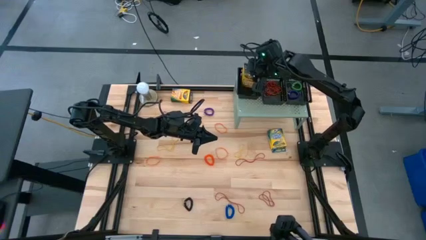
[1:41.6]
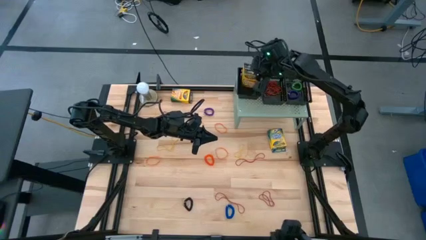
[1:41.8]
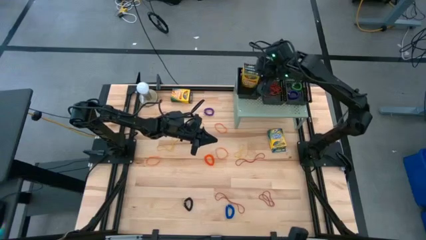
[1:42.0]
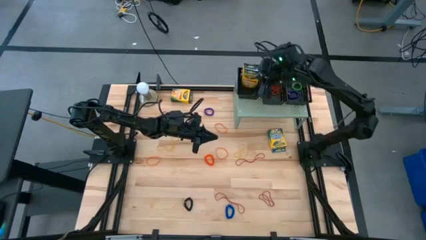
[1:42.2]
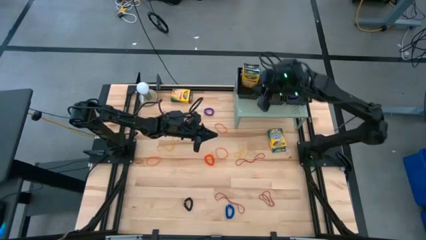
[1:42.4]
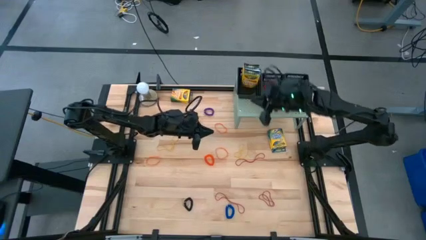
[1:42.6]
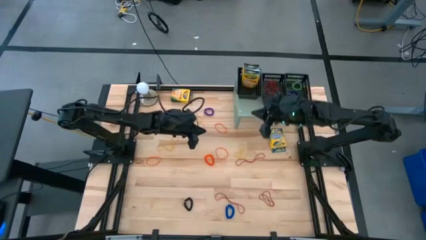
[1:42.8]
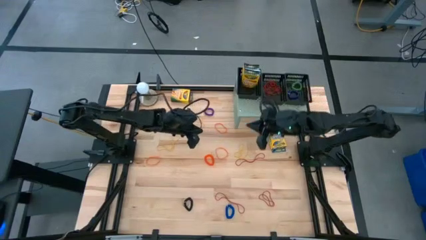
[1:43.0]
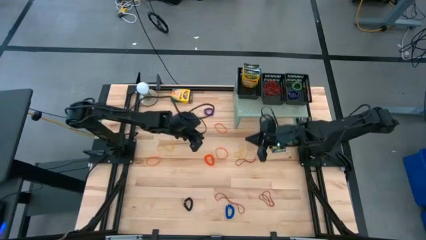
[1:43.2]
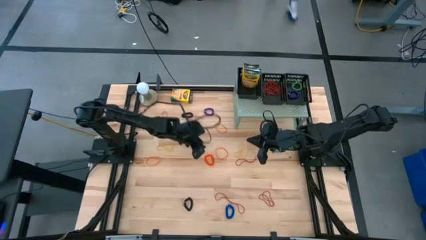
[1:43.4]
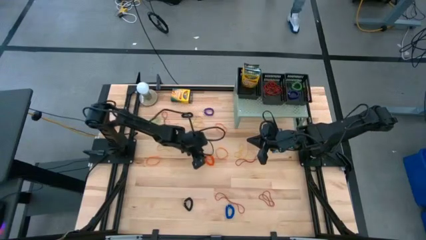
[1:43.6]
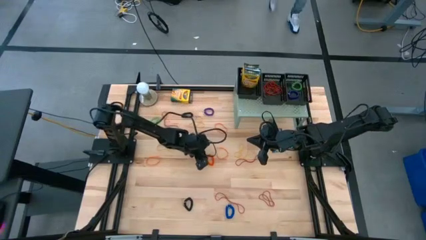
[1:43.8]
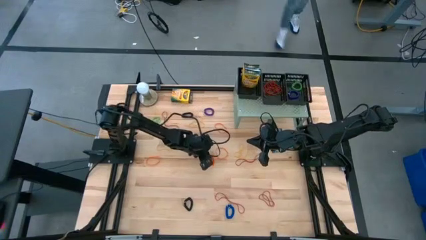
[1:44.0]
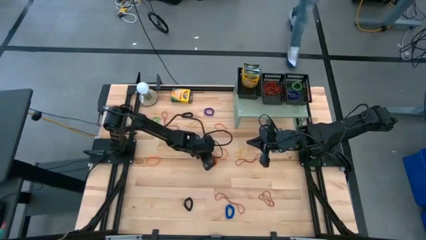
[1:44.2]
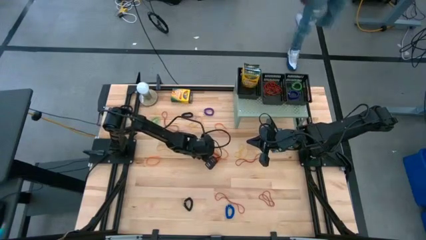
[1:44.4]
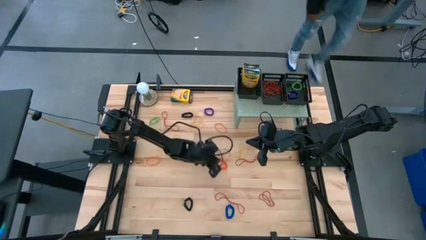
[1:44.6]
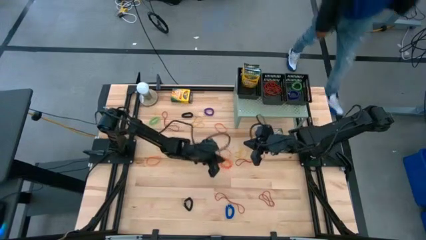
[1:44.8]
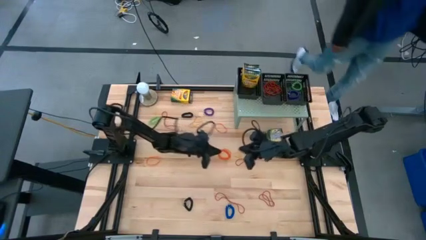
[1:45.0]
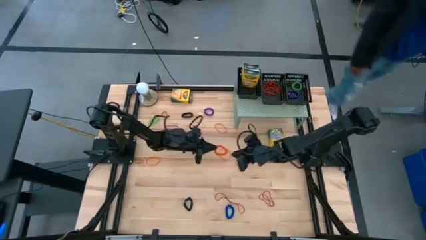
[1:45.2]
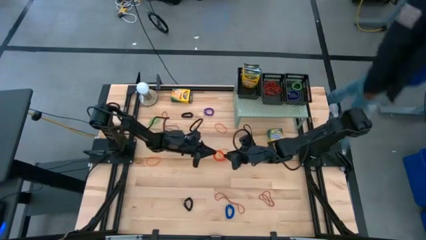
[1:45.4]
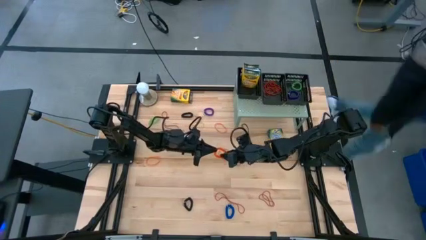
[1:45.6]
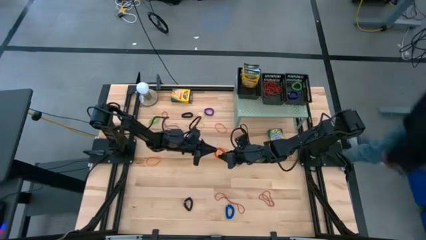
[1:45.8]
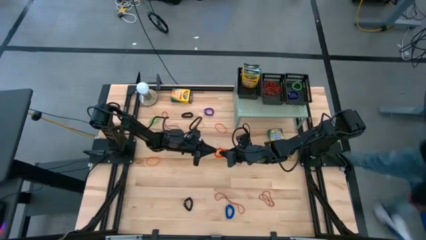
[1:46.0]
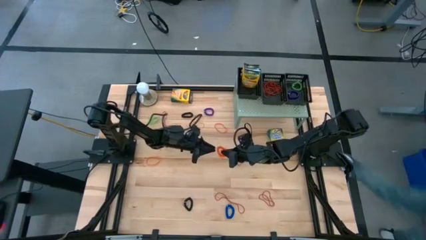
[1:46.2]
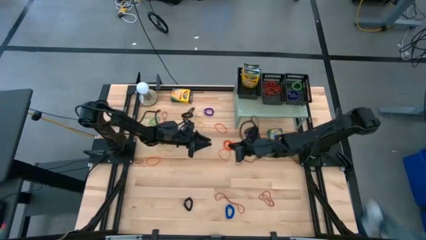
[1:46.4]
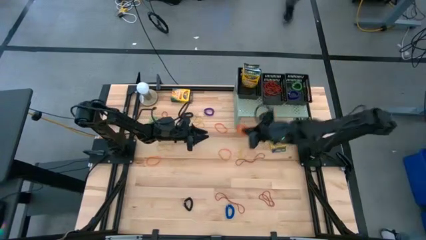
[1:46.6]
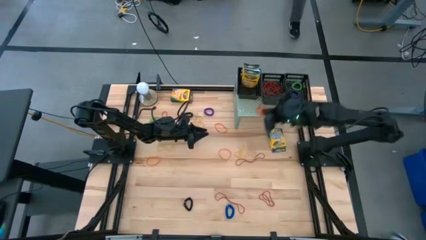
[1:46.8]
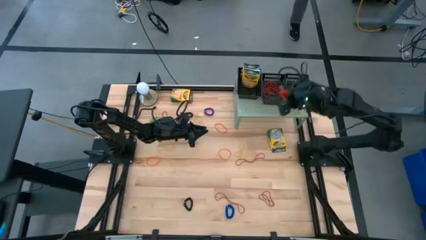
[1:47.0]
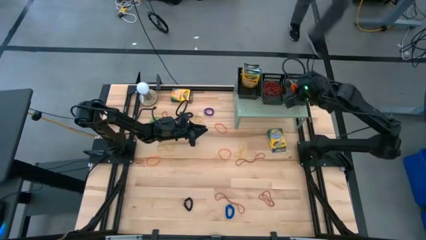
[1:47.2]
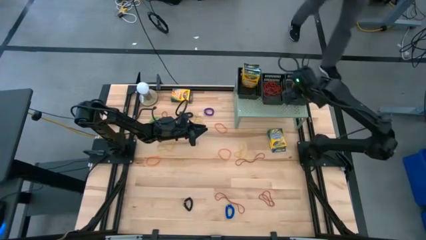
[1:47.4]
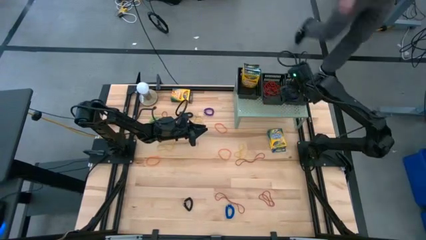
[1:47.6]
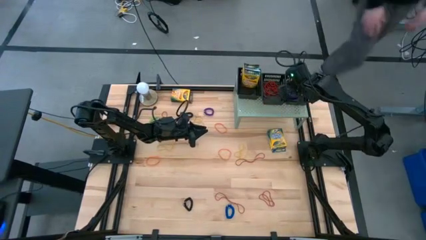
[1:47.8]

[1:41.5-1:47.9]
Task: Pick & Place Office Desk Supplies
Put the orange spring keychain into the right black basket on the shelf

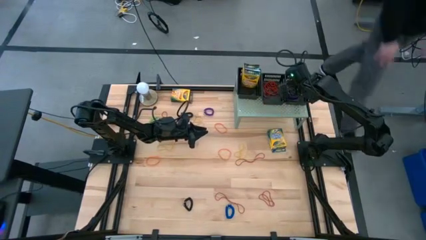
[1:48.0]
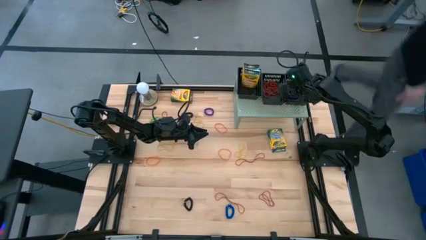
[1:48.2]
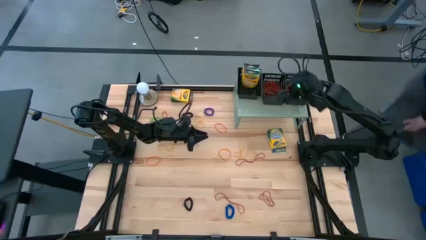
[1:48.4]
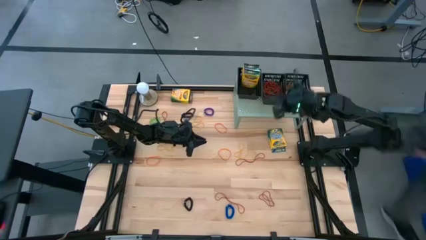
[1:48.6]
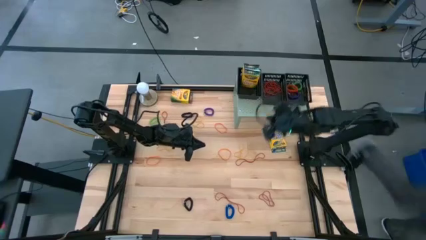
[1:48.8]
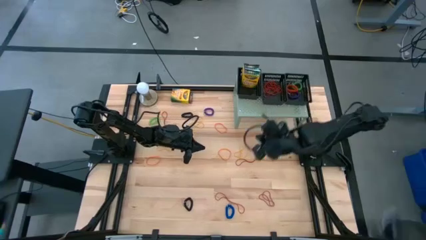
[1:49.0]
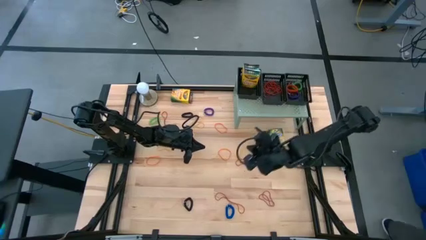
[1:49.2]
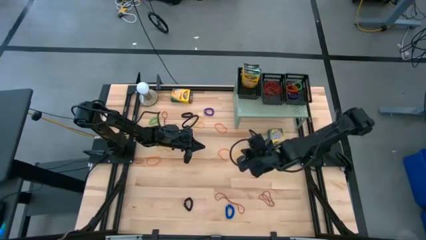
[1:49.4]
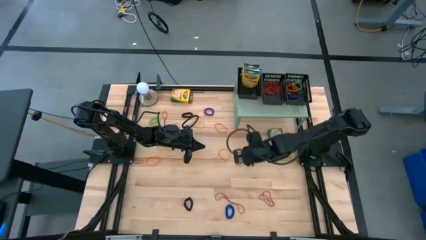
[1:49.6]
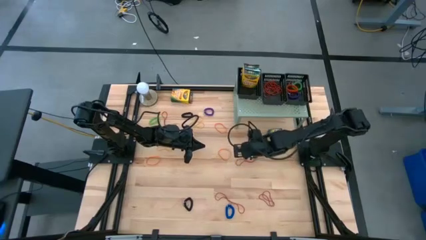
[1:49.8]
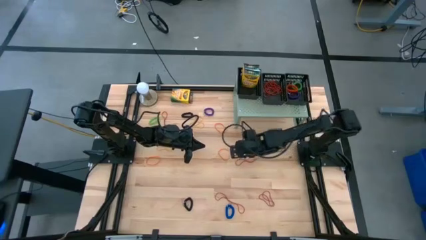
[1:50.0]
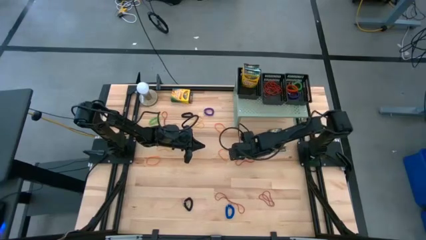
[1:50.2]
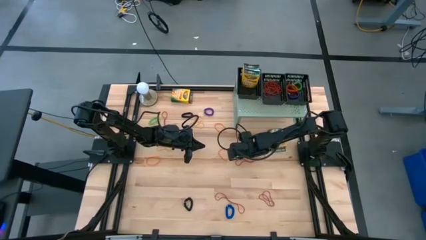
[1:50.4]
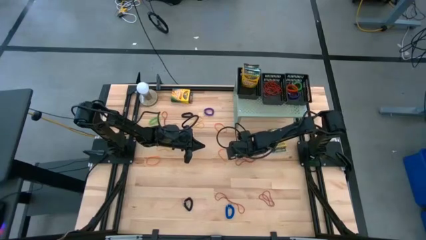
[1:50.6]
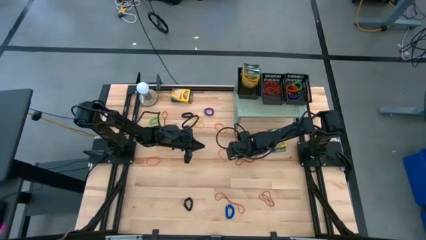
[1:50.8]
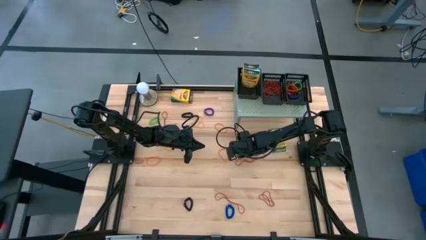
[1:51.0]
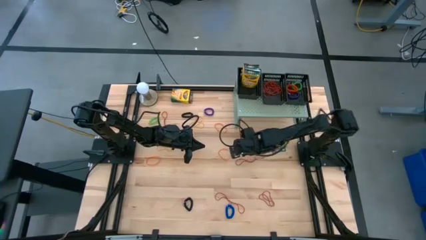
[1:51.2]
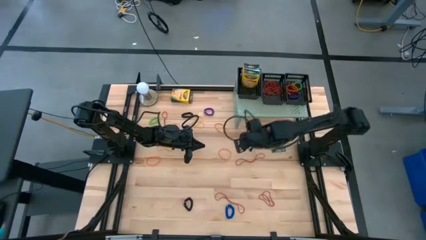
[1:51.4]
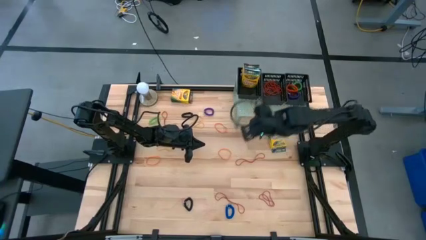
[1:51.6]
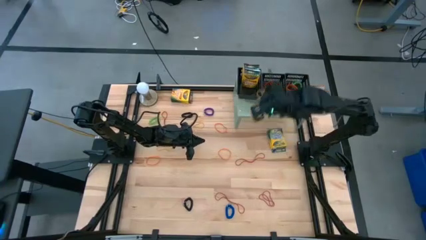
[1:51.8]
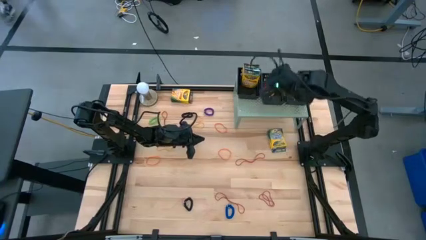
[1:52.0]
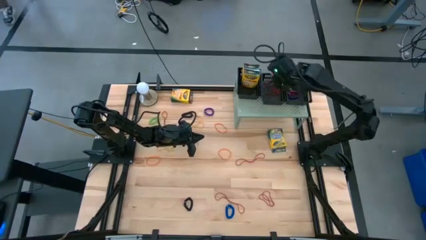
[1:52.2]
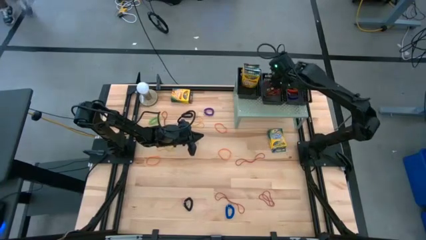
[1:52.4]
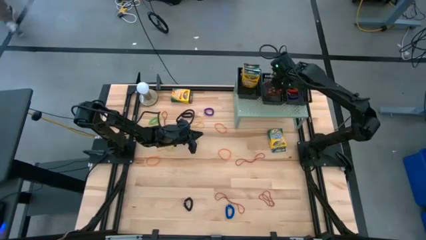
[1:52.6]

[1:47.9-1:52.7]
Put the bottom right yellow rubber band into the middle black basket on the shelf

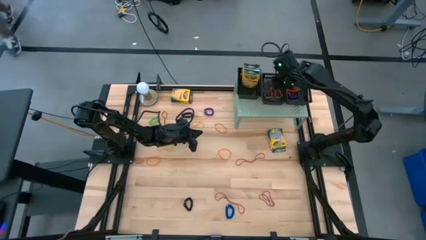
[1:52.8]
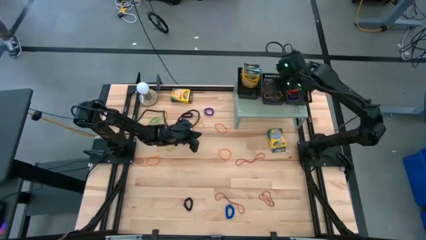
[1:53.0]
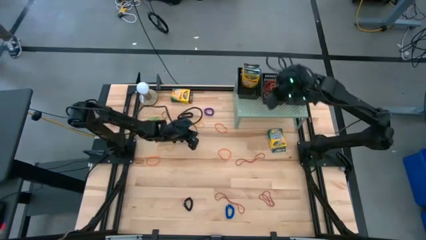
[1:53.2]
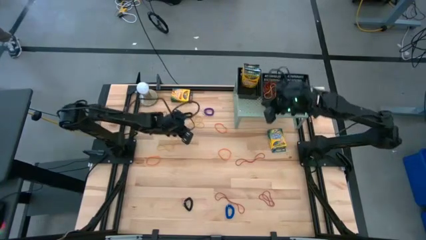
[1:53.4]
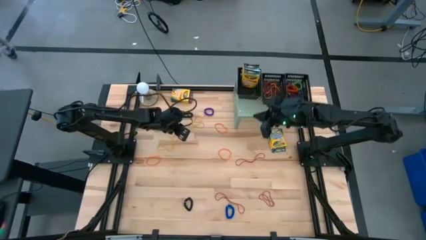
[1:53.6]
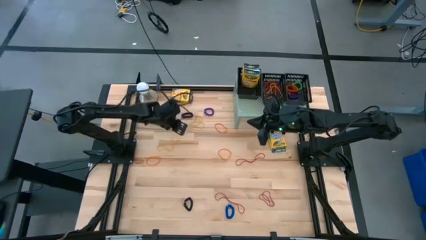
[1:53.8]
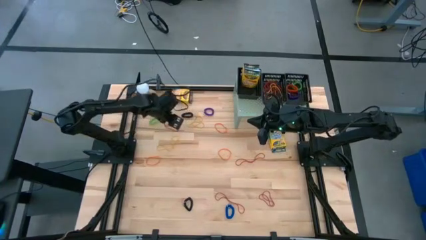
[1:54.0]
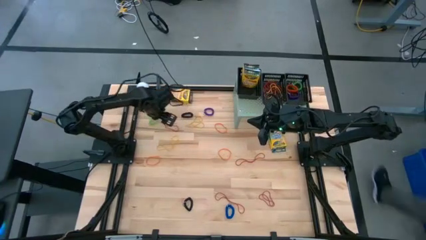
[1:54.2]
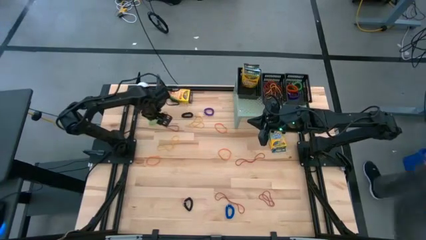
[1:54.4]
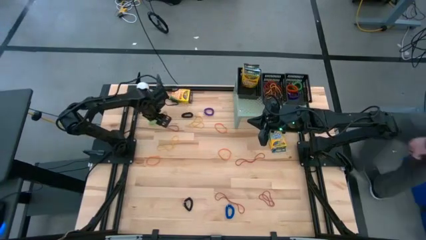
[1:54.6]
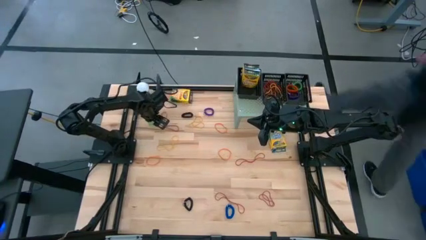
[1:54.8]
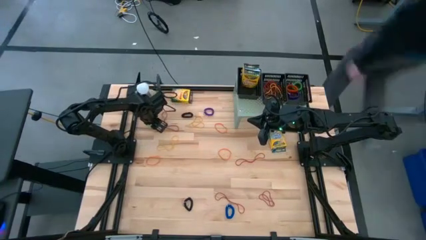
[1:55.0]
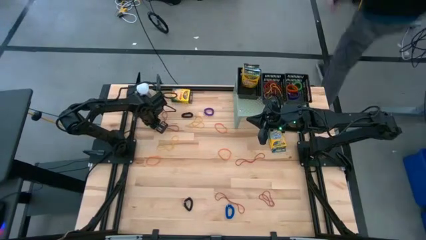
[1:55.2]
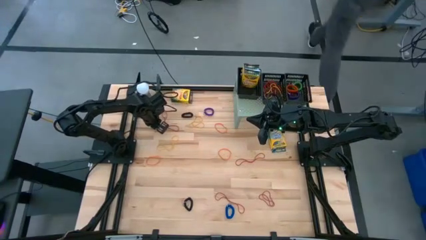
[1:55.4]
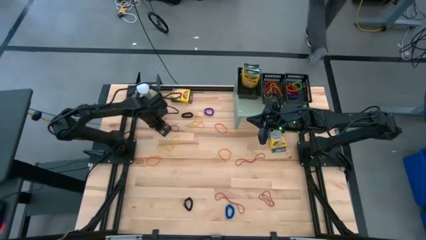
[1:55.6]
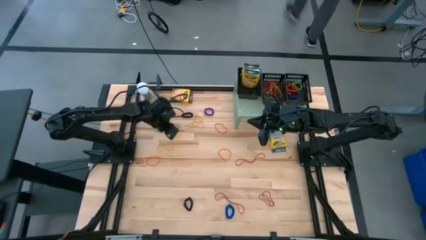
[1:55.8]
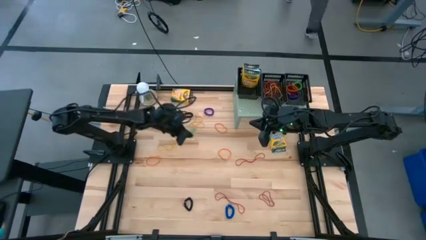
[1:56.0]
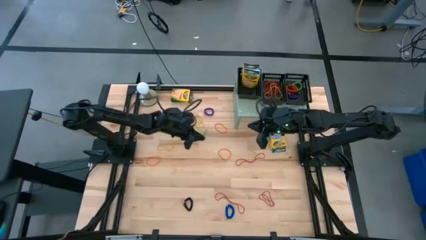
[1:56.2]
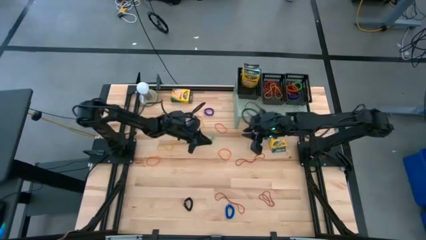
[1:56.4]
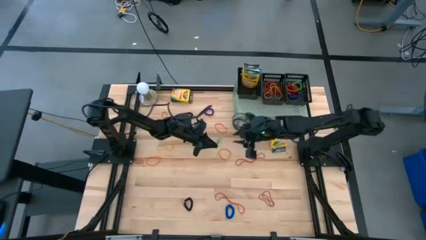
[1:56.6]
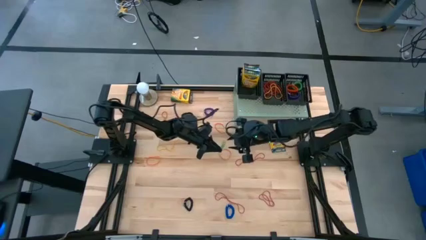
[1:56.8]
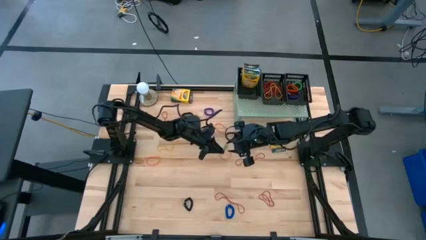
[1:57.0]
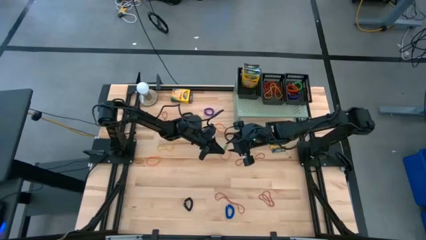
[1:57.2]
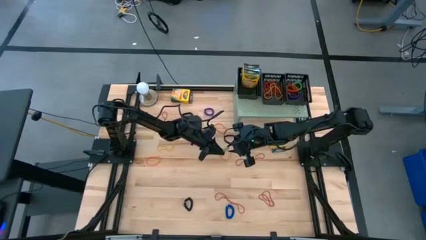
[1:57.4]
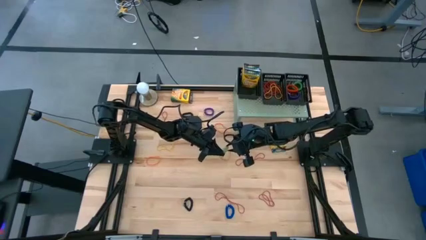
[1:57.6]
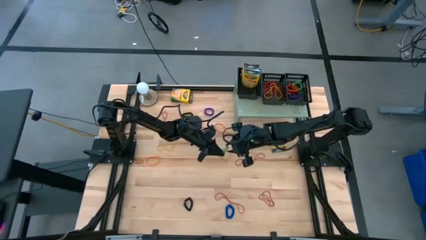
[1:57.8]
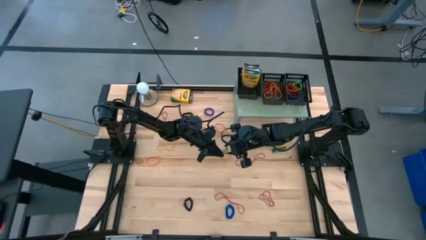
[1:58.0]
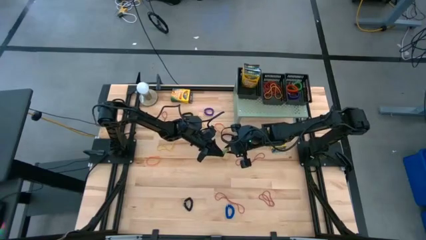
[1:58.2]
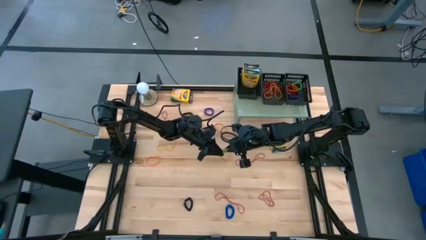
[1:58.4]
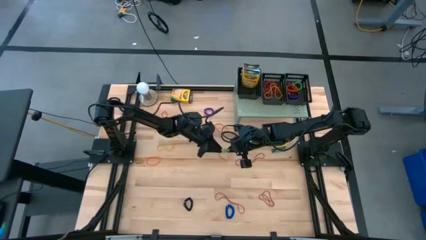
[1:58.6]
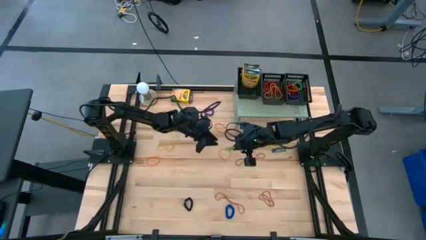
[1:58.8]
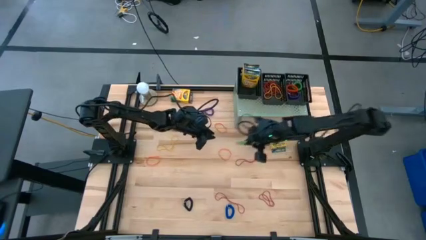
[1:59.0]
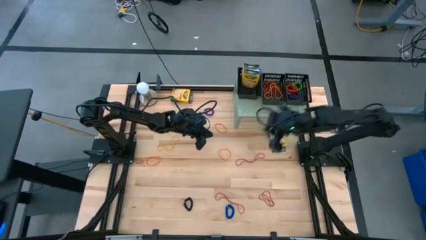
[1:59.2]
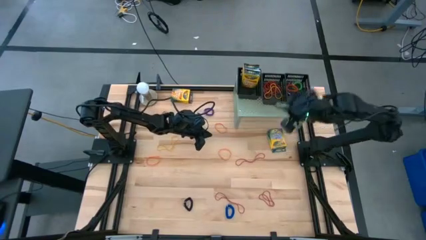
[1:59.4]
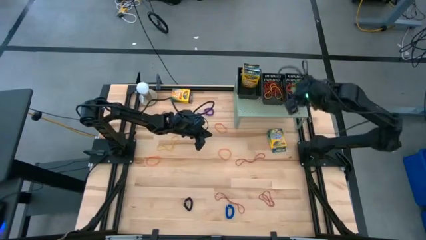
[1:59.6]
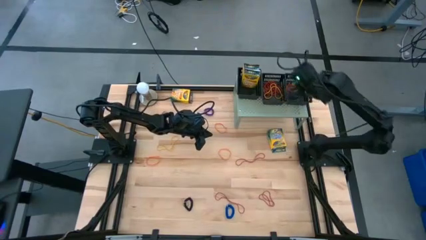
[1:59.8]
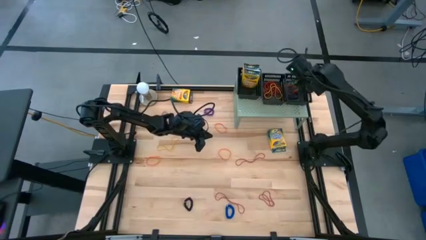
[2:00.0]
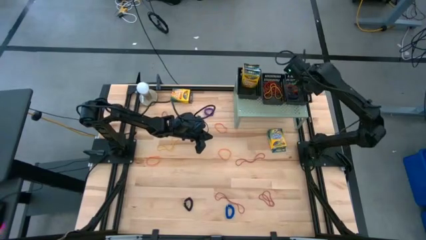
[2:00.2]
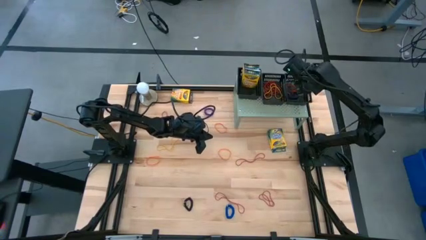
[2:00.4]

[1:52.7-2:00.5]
Put the green spring keychain into the right black basket on the shelf
